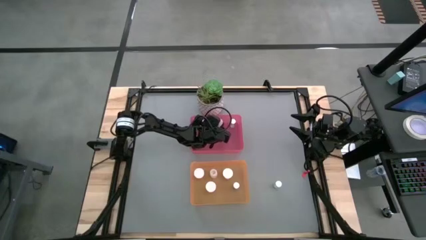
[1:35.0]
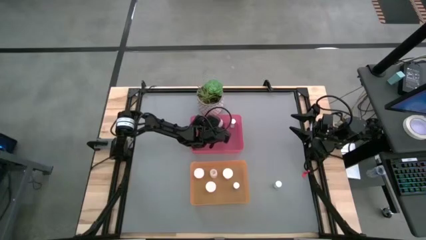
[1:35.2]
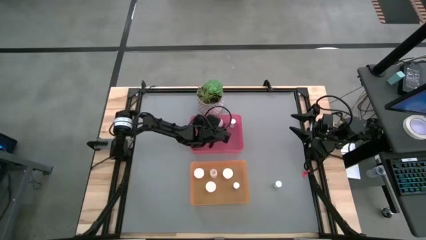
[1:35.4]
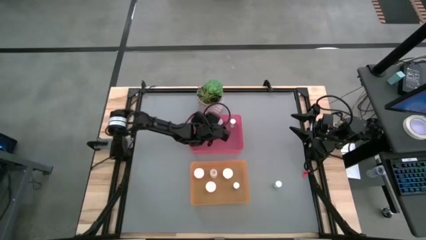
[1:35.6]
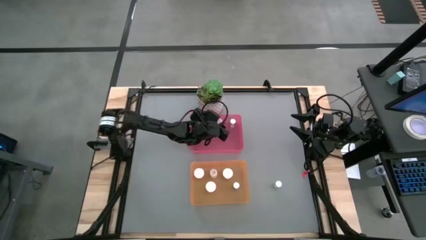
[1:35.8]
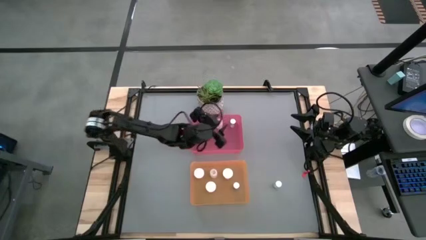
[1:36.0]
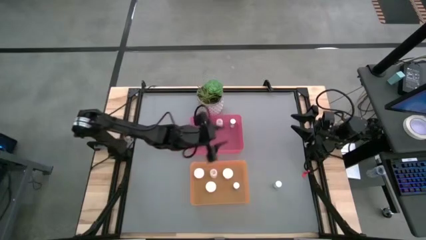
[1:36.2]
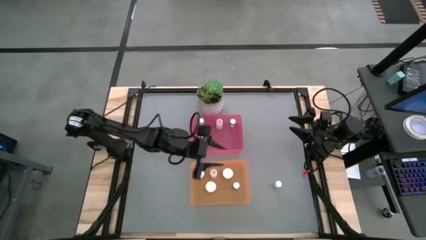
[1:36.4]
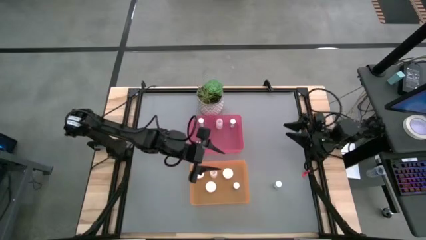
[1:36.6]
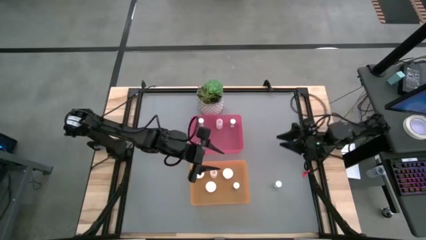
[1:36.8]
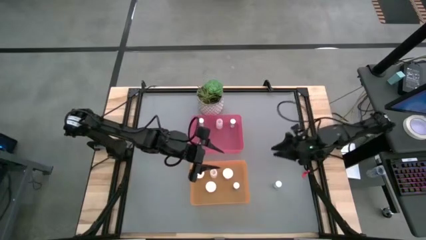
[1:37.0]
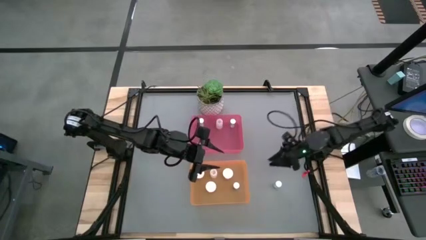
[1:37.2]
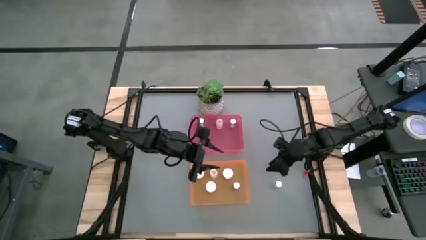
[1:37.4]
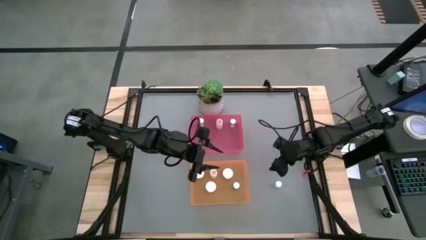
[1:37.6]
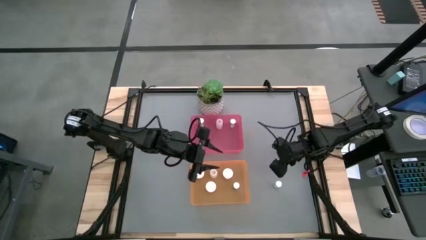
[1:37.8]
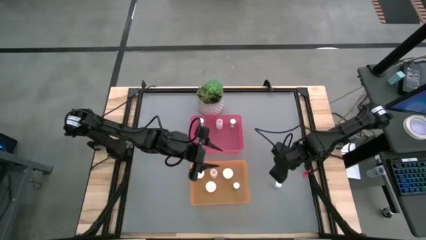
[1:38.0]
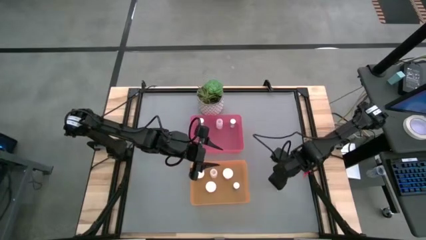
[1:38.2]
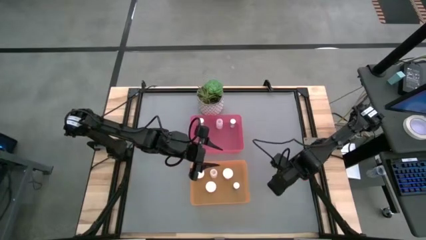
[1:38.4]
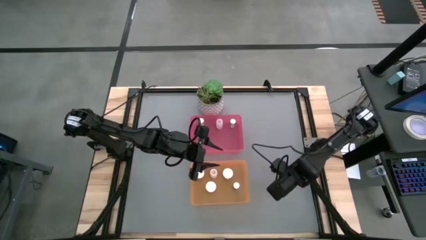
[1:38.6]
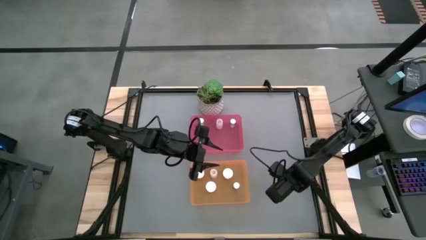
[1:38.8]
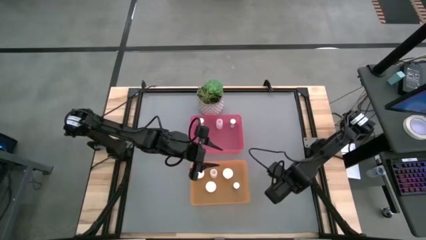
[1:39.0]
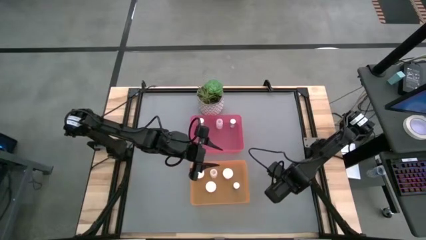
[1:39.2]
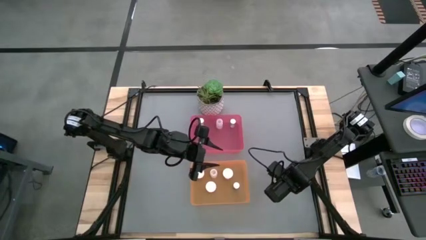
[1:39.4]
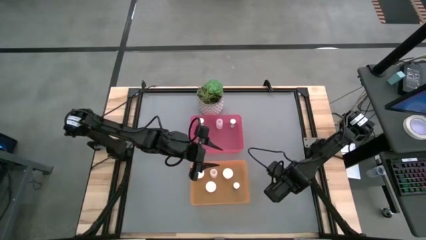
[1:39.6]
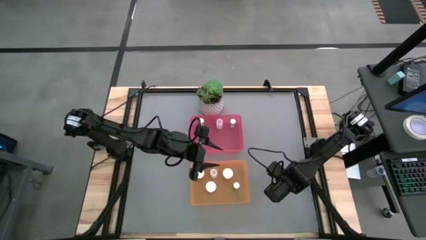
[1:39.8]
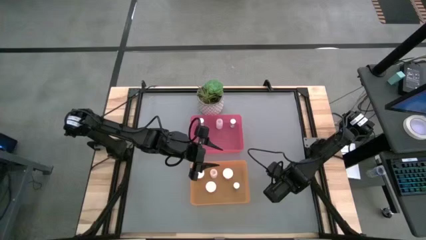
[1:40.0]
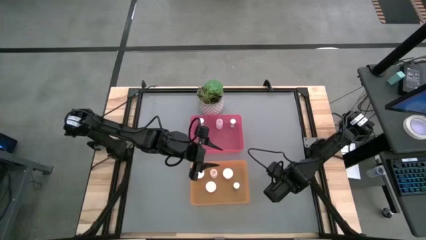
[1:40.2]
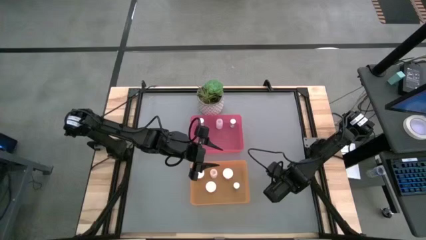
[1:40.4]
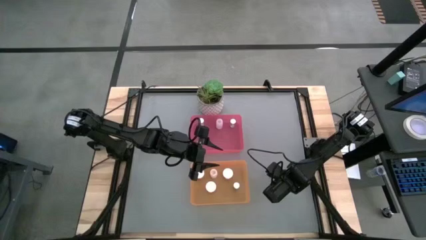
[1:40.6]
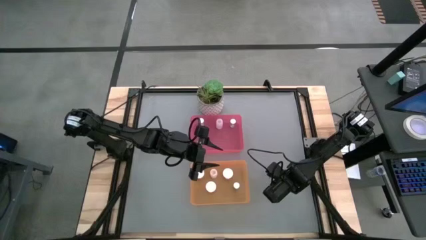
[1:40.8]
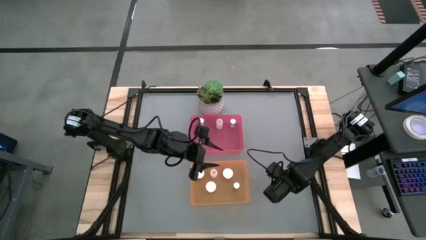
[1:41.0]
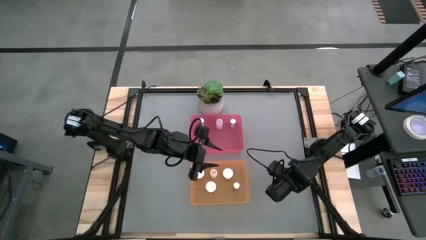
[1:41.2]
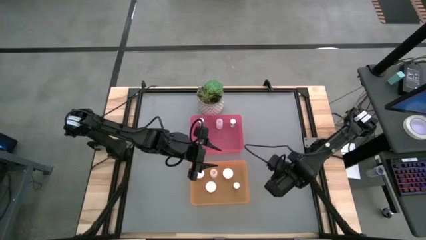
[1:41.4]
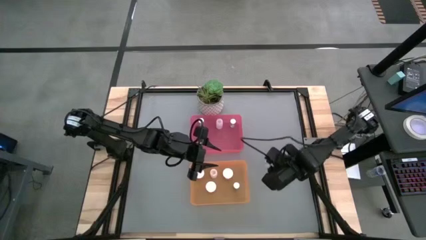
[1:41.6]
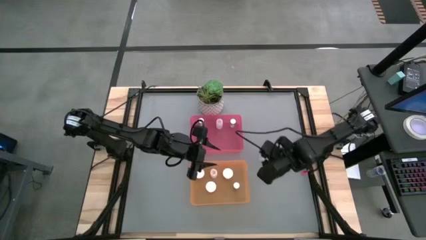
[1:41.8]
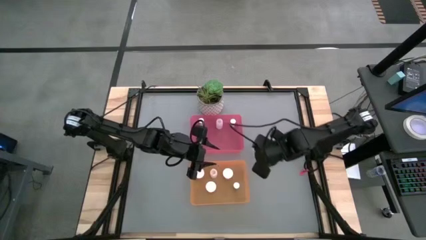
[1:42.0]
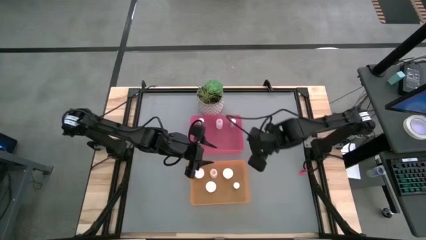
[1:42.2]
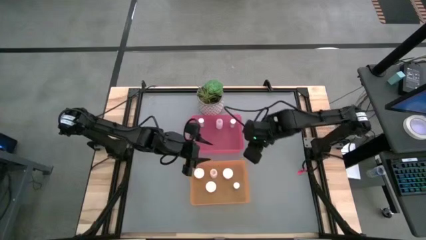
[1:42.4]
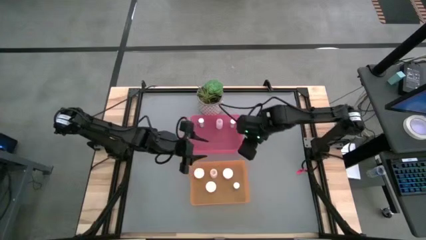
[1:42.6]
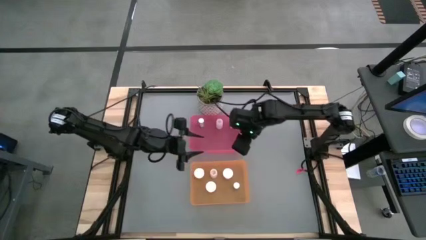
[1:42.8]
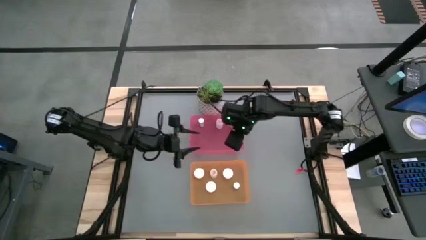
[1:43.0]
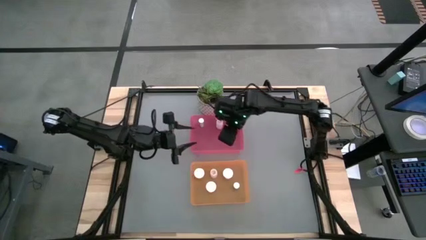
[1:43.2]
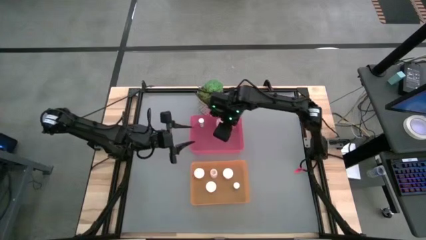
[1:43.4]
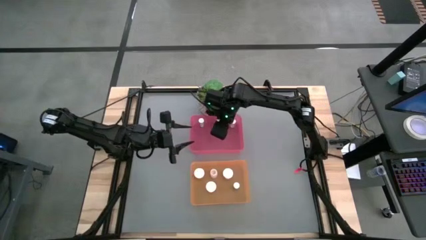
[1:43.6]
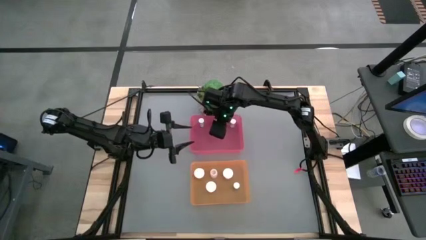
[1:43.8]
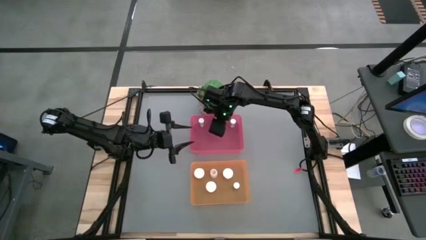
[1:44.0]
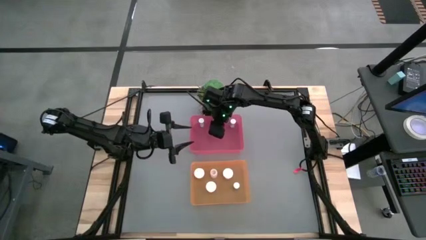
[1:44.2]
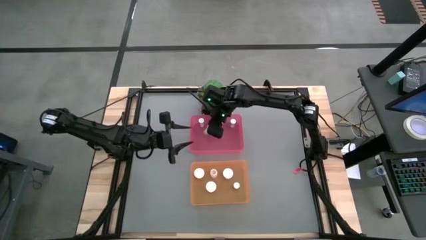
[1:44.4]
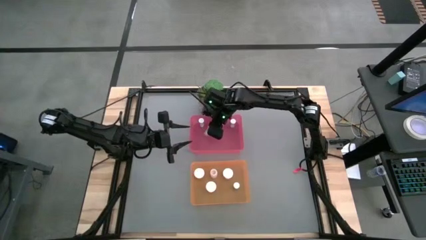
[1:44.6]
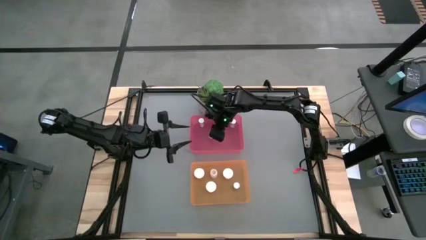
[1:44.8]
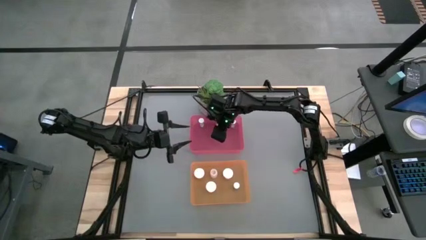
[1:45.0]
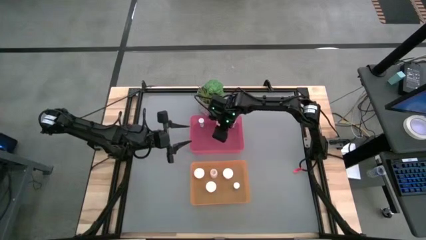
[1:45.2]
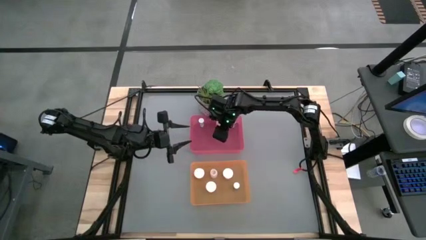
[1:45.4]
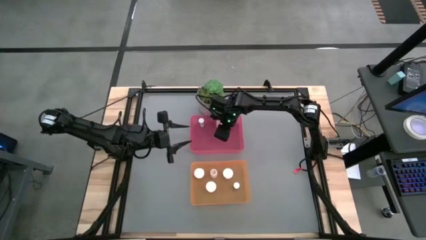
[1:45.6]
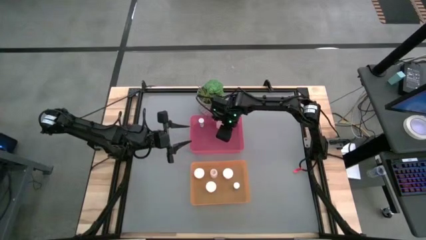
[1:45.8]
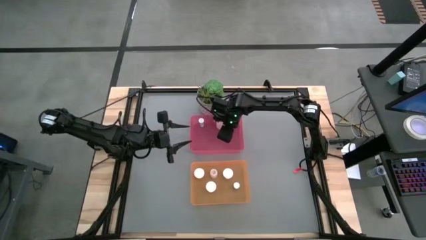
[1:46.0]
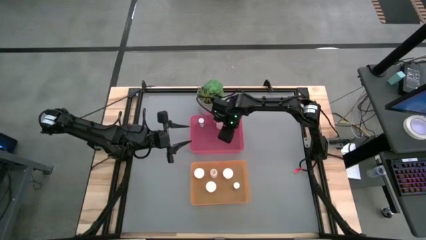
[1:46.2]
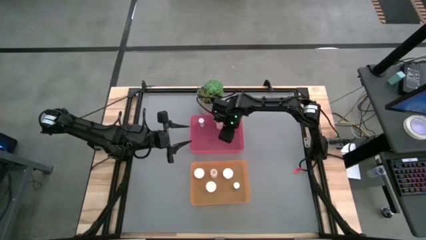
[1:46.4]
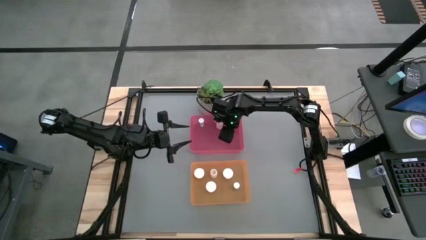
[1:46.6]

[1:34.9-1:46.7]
Task: Pick and place medicine bottles into bin by pill shape (circle, oval)
Put the blue tablet bottle into the pink bin

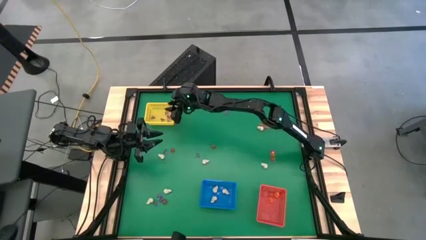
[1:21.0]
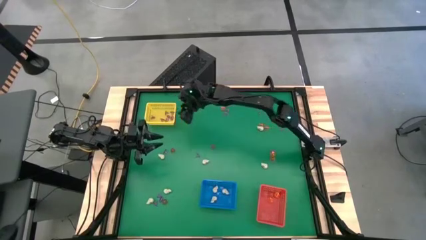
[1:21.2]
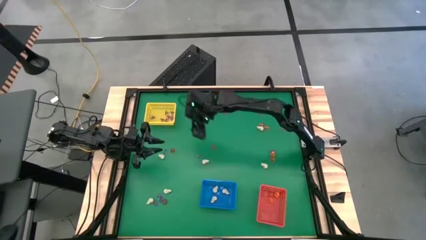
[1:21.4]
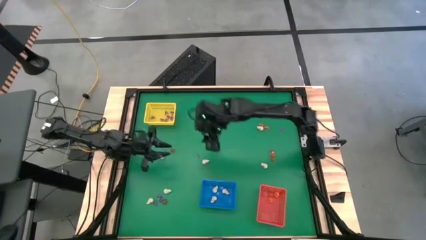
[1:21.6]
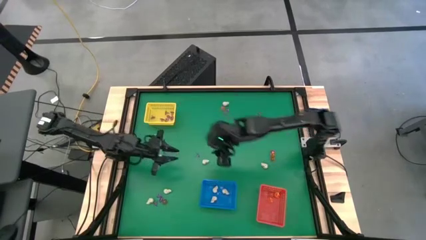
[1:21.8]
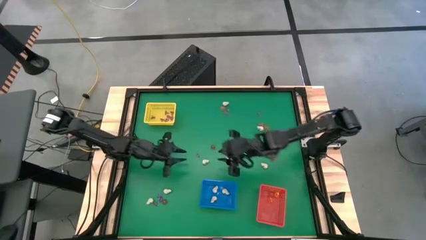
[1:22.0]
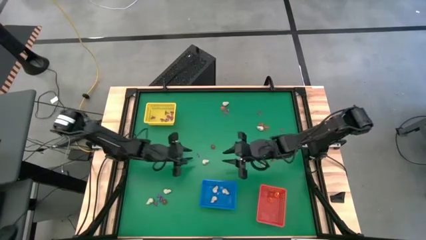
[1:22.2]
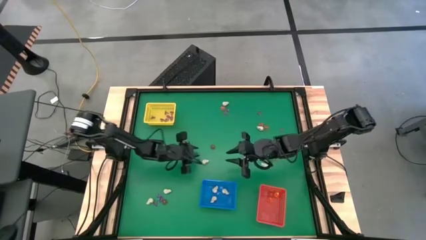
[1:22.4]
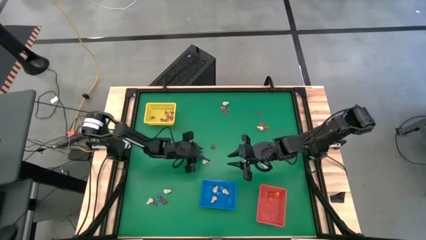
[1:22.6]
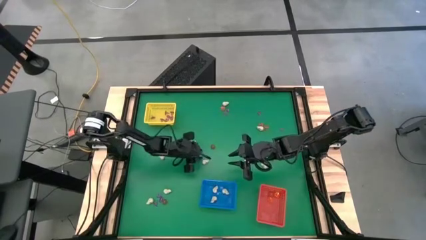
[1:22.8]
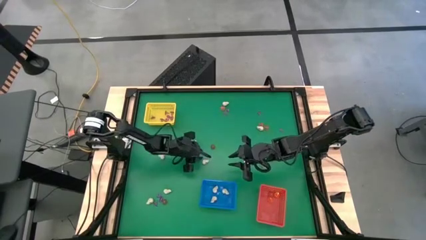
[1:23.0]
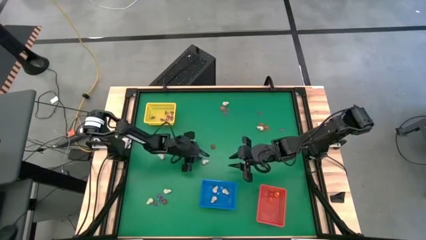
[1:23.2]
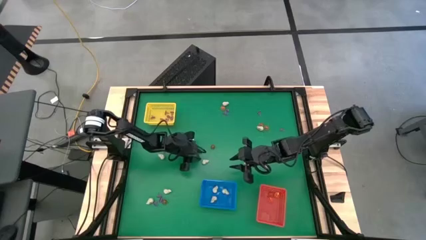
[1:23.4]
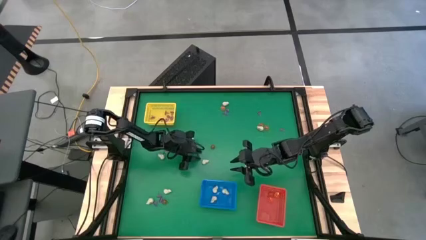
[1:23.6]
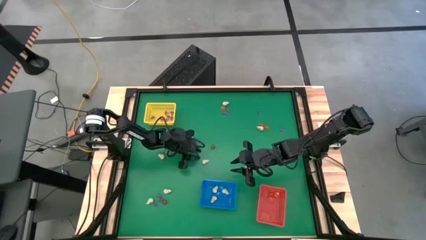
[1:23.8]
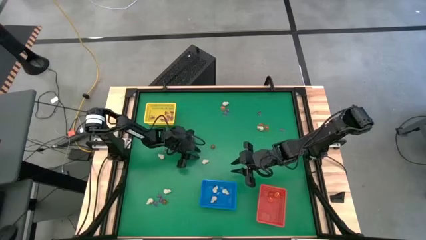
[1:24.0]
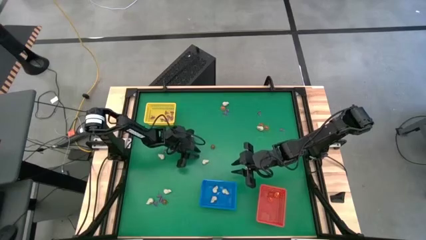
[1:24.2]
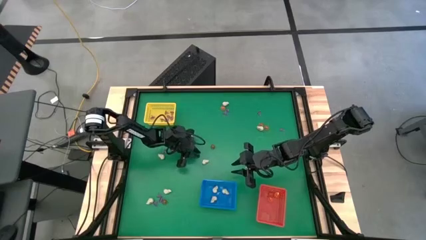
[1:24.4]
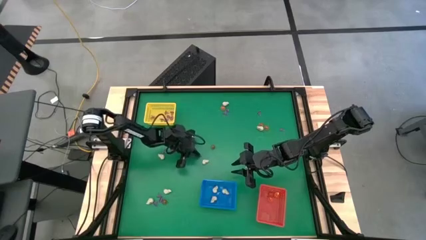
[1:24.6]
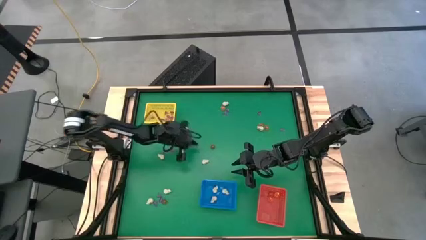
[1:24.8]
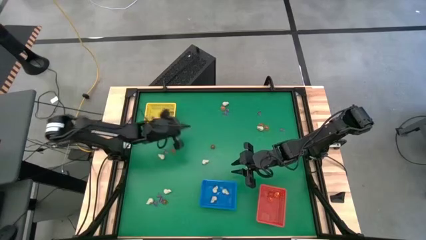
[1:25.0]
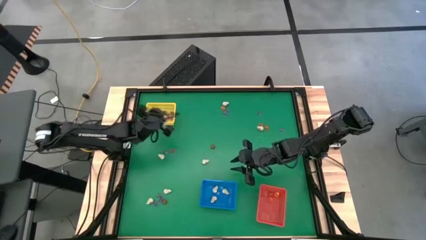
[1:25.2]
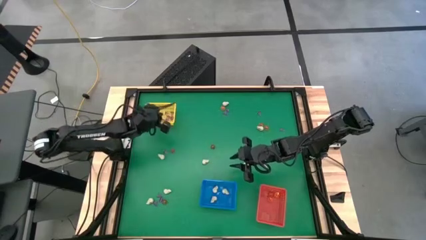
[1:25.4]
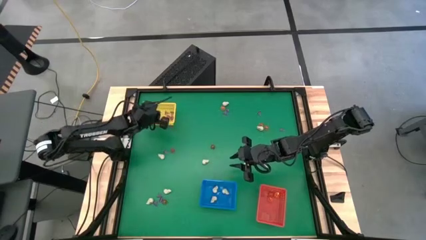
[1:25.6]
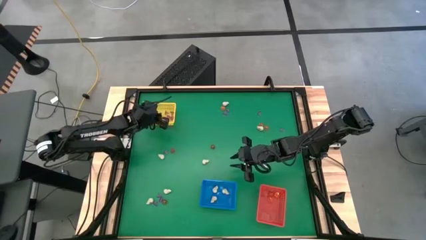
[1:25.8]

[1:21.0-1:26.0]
Task: Sort Halloween decoration
Put the purple witch hat toy into the yellow basket
